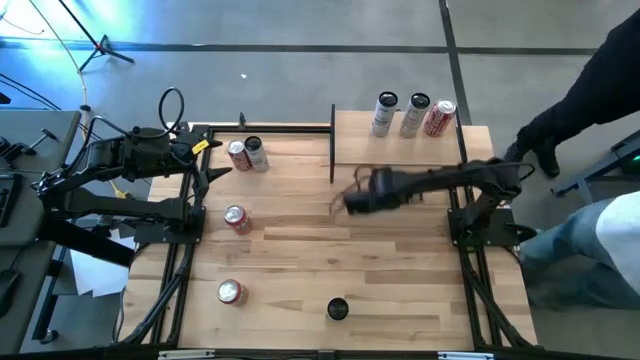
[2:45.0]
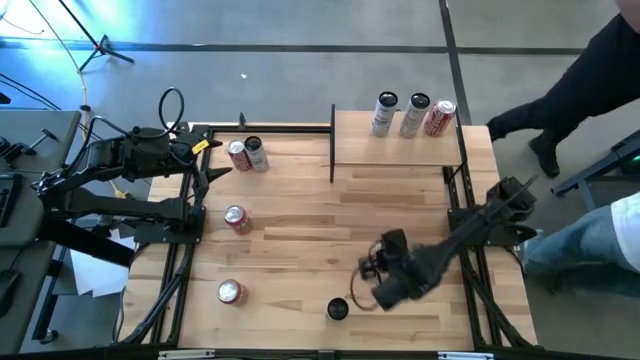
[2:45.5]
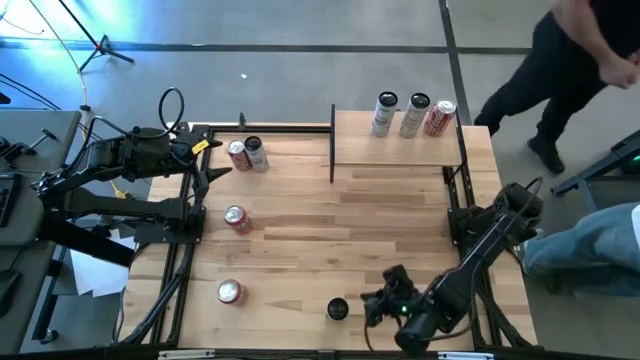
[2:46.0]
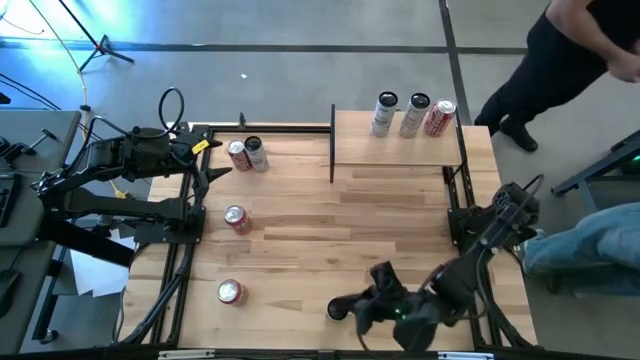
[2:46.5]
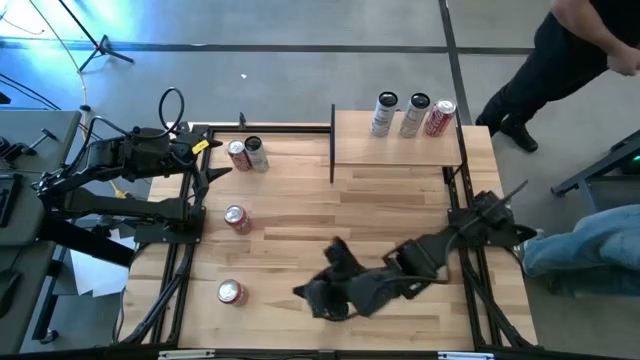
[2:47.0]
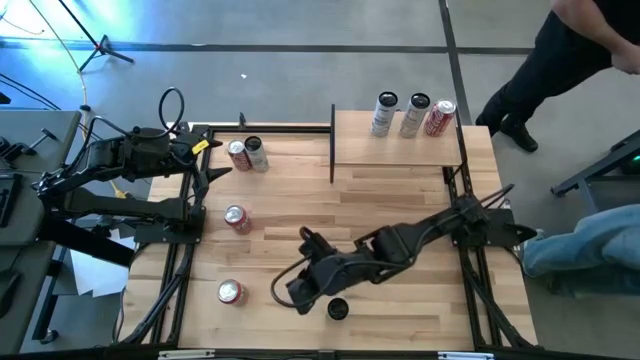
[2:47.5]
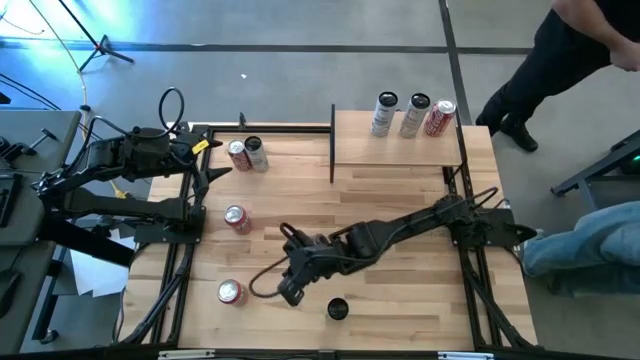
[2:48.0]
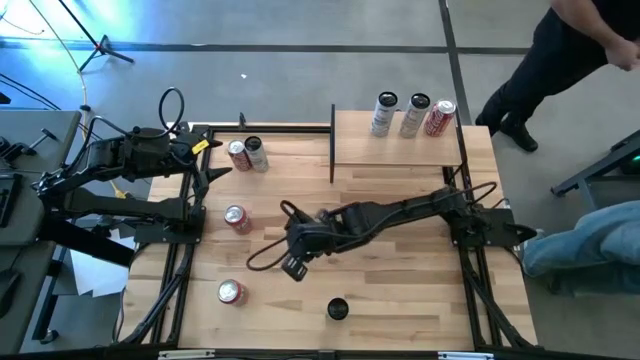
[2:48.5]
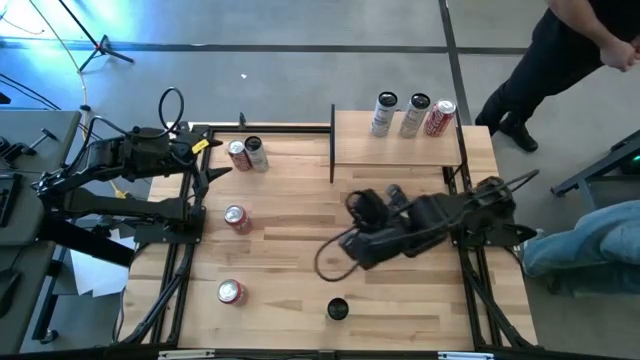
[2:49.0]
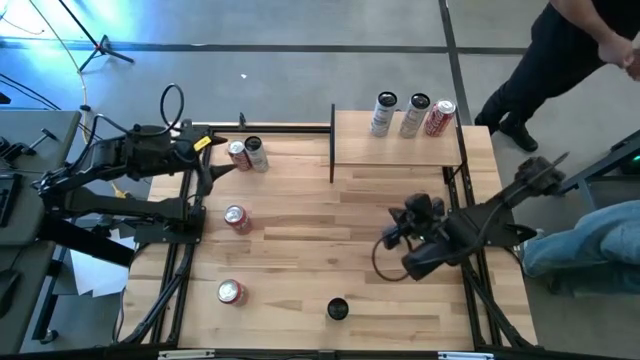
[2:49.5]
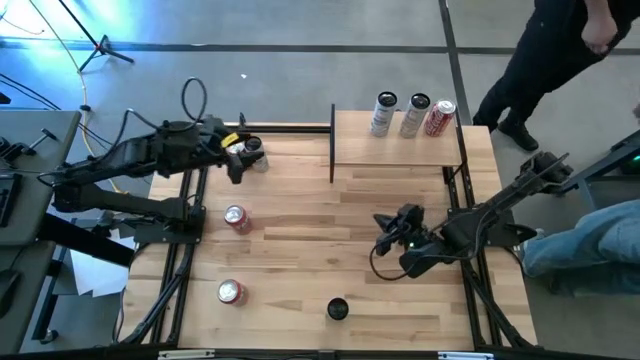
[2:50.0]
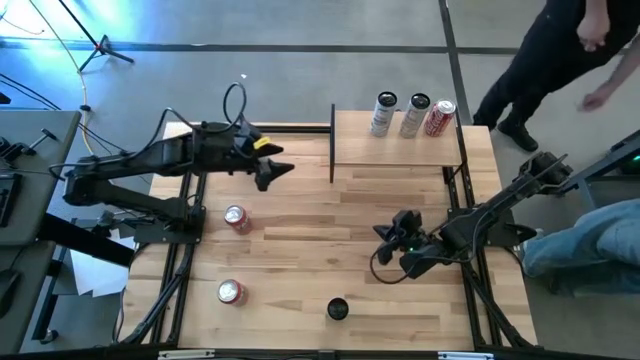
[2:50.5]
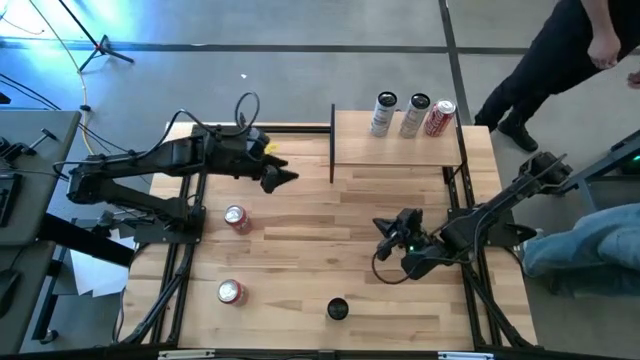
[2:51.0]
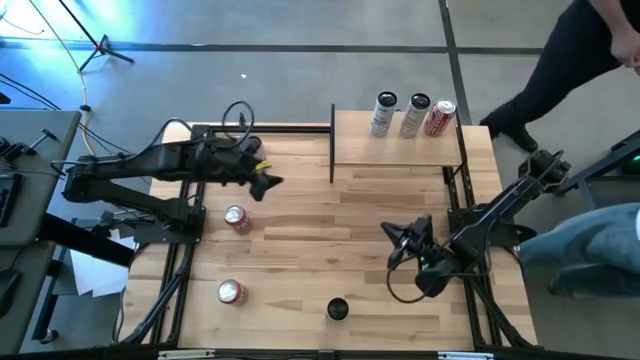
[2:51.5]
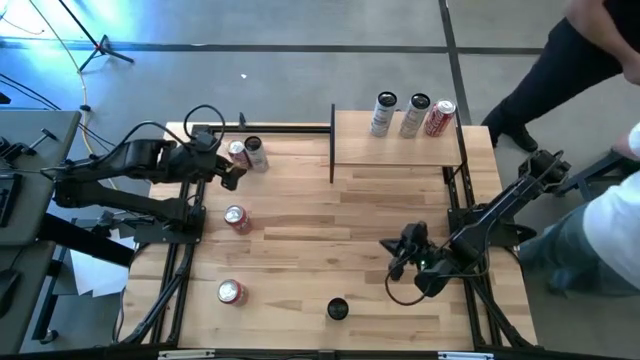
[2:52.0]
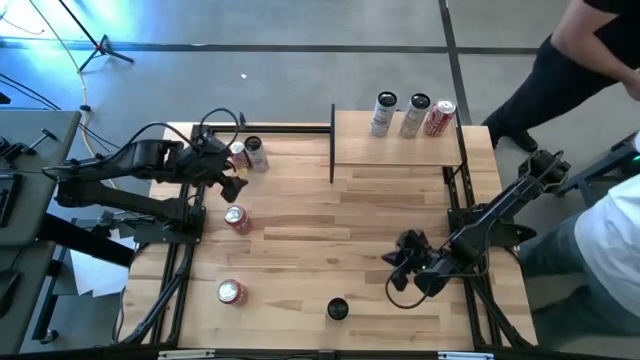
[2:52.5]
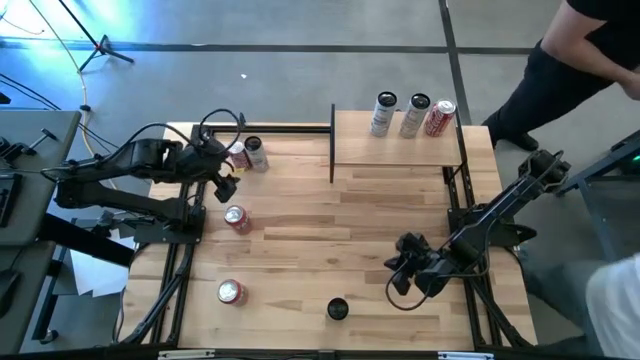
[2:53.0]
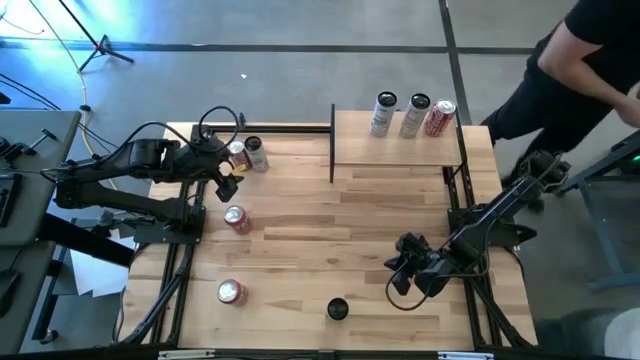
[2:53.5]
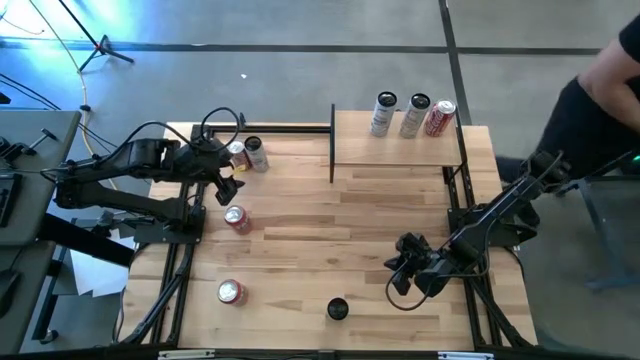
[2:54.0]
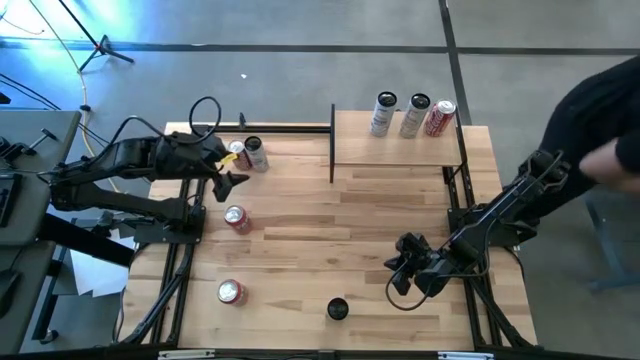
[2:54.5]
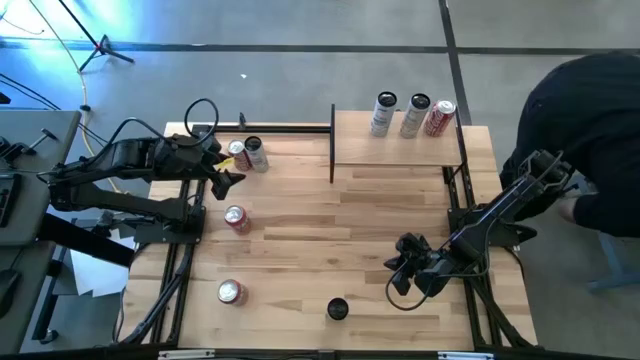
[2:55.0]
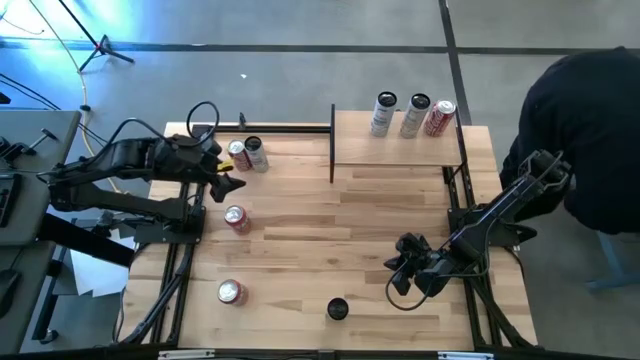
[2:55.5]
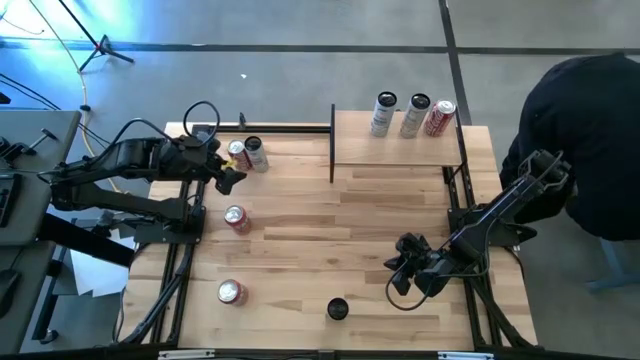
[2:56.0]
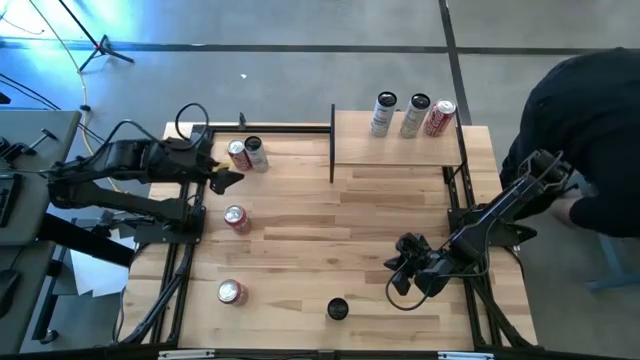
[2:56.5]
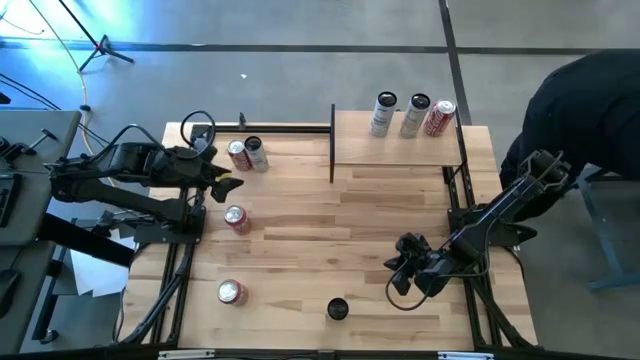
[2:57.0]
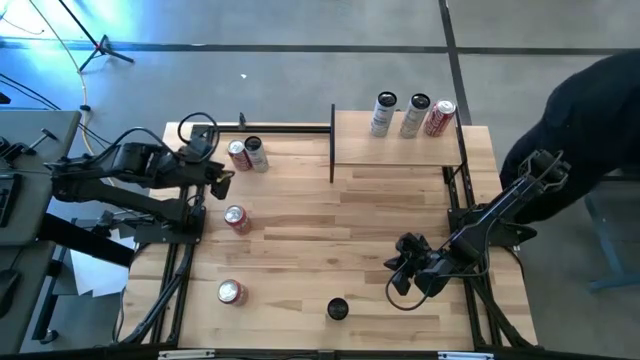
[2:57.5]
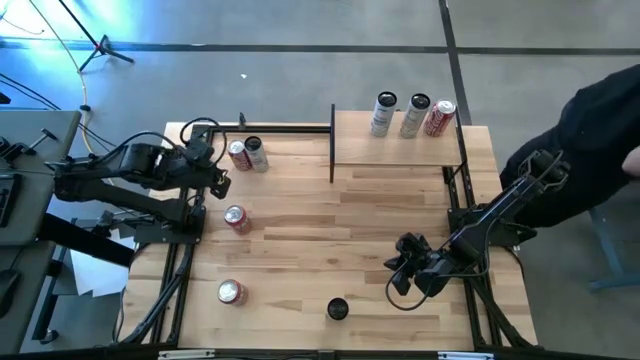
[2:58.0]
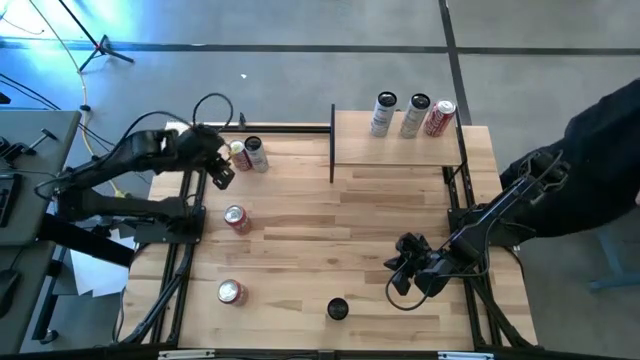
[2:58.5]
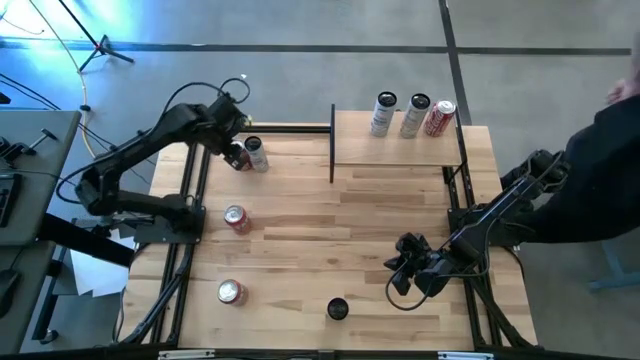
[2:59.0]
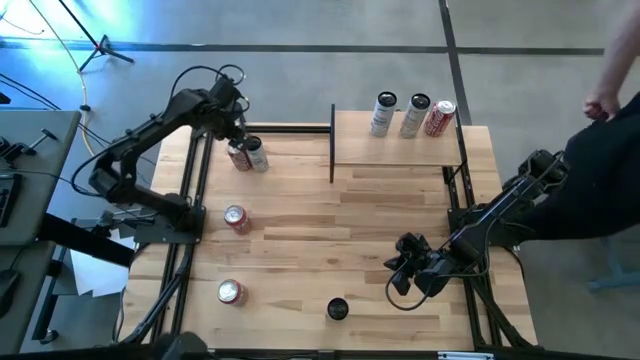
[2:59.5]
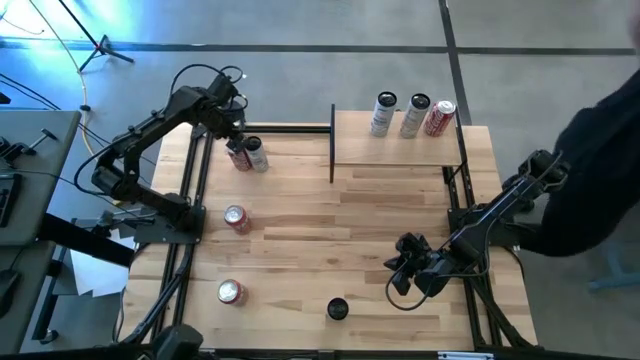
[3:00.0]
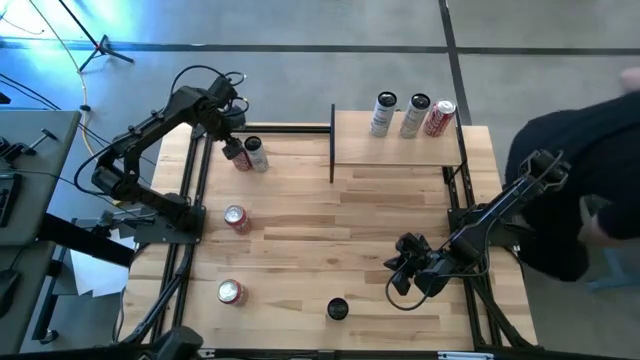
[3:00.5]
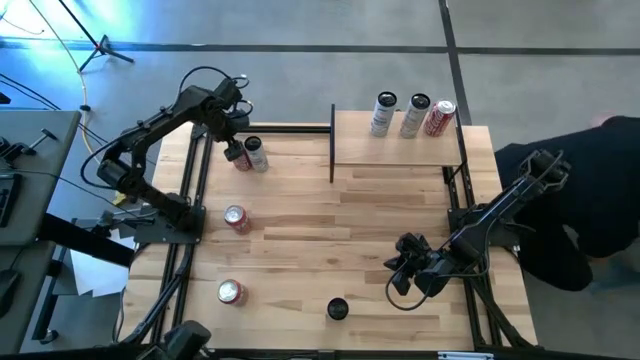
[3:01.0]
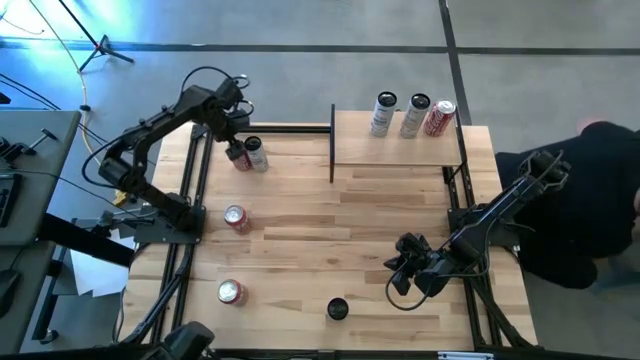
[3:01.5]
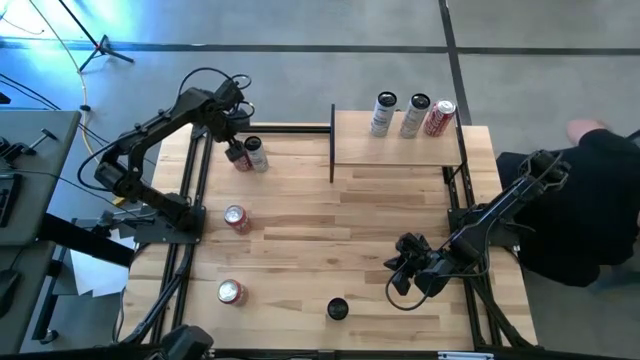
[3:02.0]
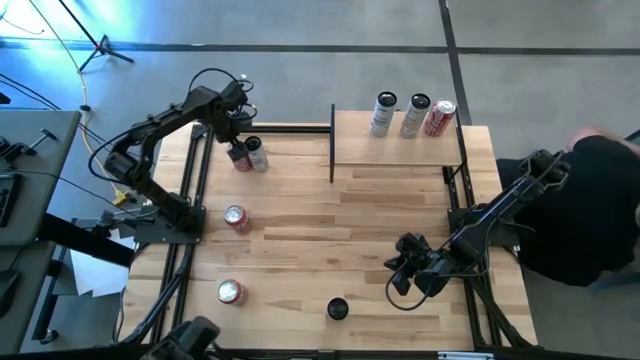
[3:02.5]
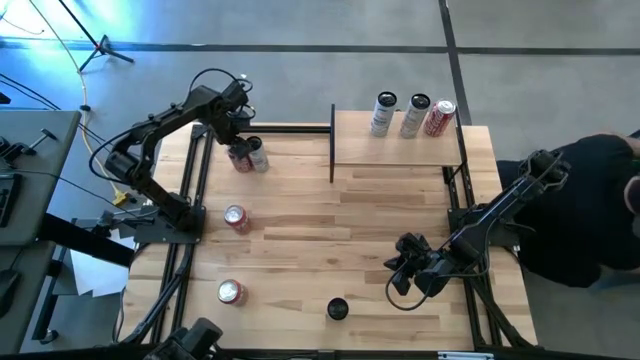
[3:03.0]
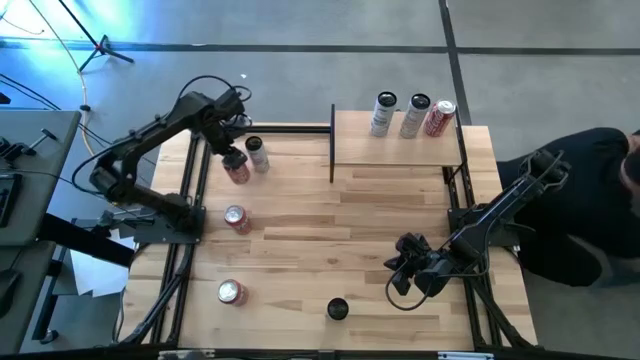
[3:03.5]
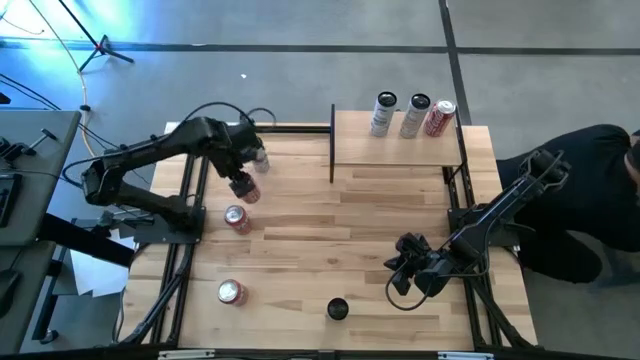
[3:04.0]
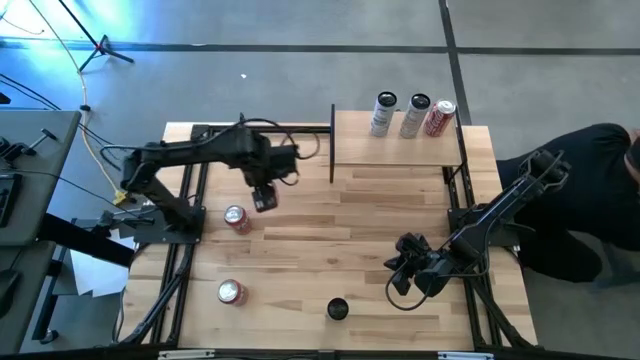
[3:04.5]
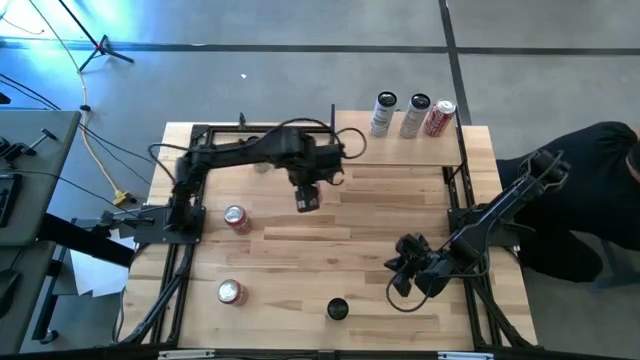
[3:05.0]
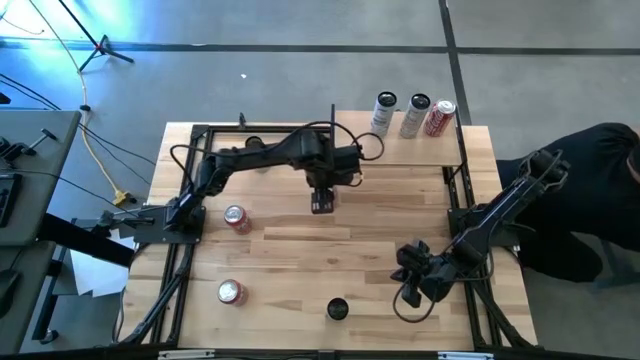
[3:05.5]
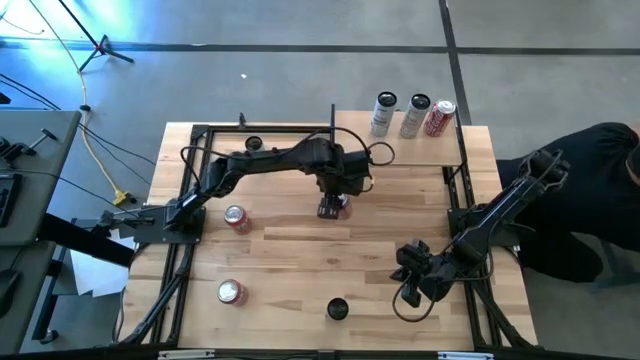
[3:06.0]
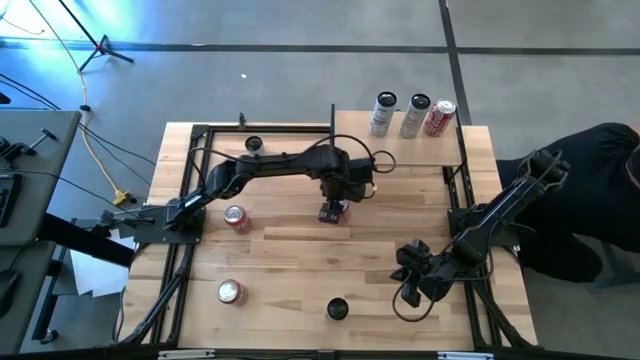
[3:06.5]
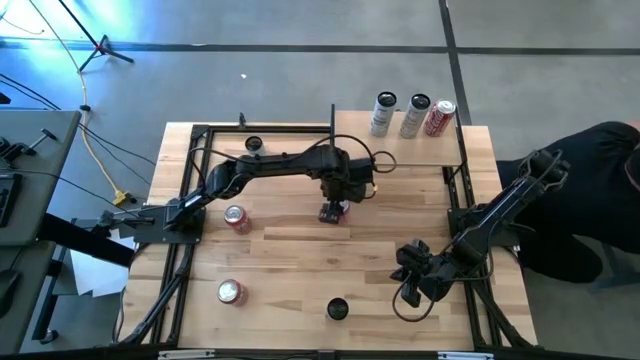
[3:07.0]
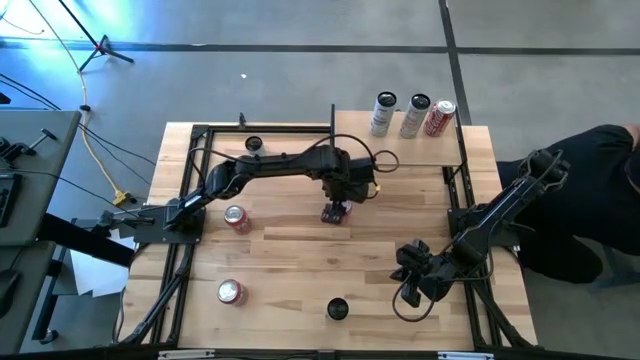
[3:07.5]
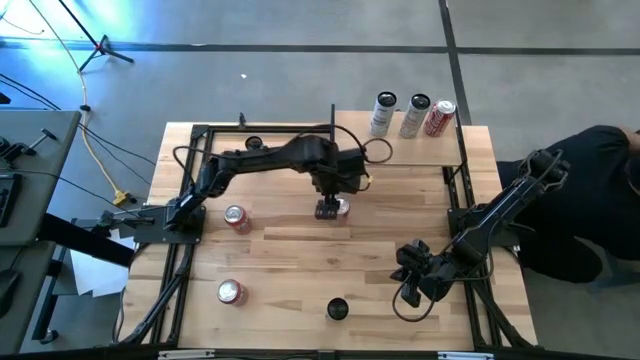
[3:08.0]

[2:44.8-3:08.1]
Task: Place canned beverage on shelf
Move the red soda to the center of the table
